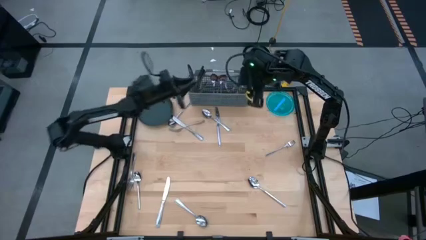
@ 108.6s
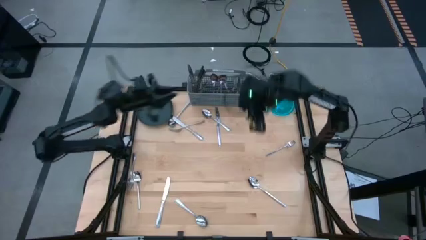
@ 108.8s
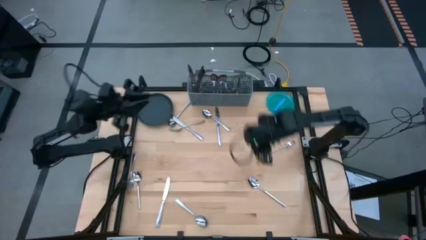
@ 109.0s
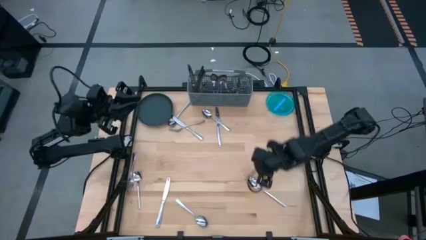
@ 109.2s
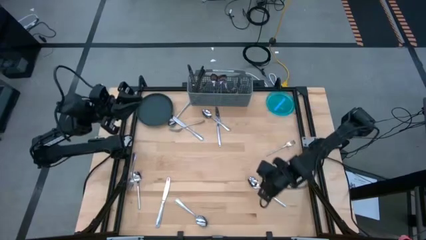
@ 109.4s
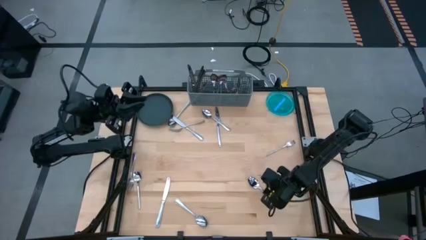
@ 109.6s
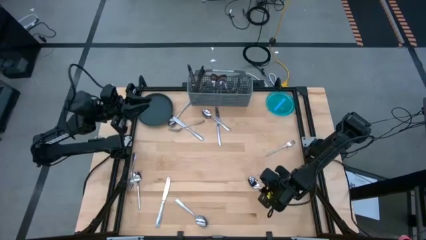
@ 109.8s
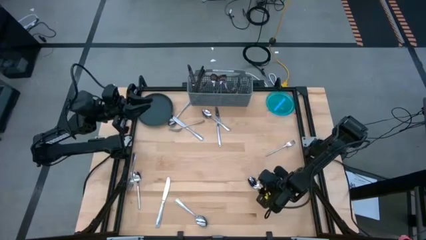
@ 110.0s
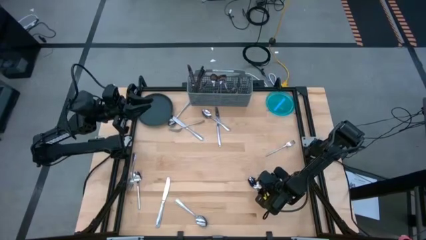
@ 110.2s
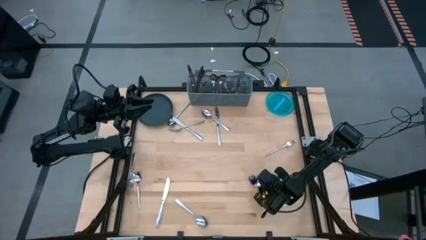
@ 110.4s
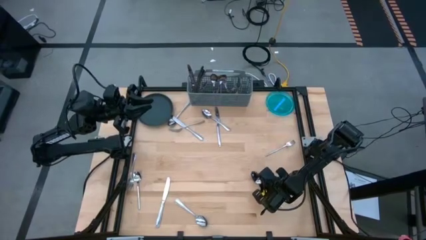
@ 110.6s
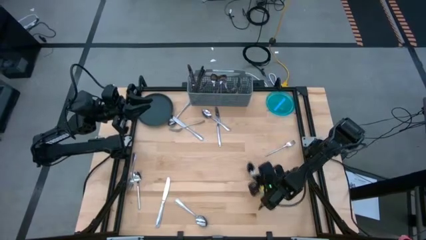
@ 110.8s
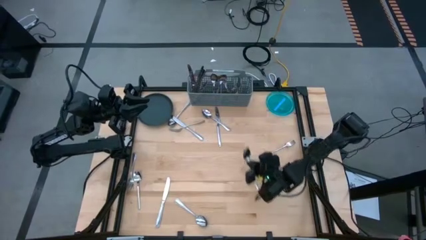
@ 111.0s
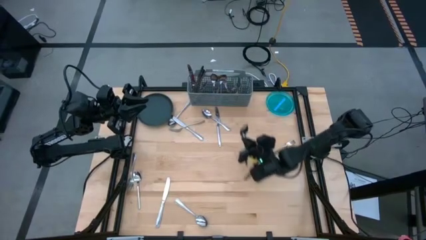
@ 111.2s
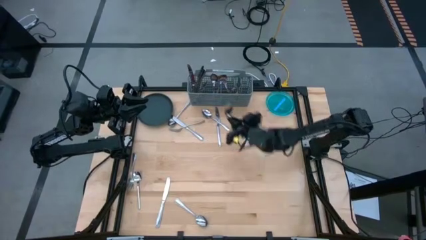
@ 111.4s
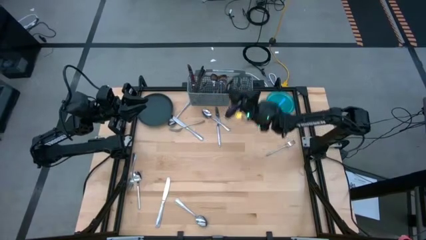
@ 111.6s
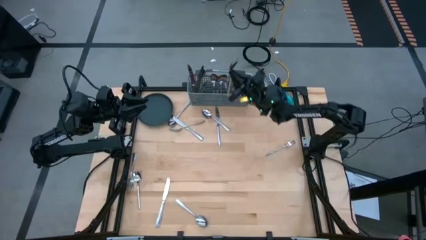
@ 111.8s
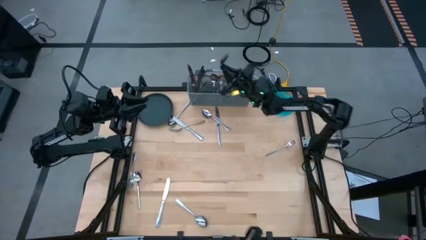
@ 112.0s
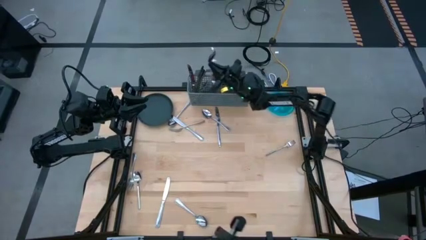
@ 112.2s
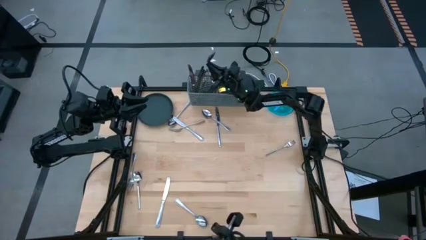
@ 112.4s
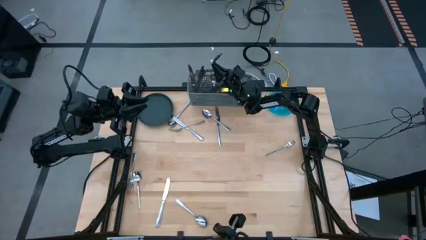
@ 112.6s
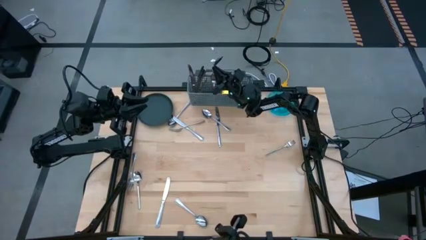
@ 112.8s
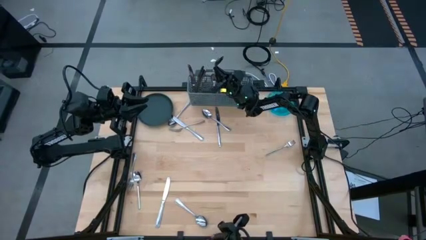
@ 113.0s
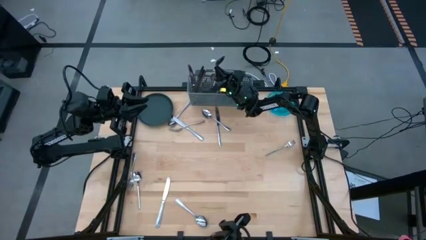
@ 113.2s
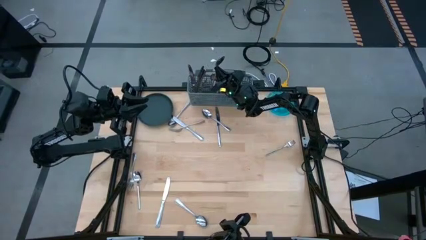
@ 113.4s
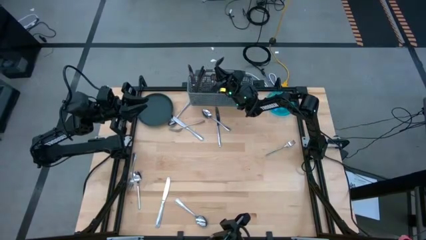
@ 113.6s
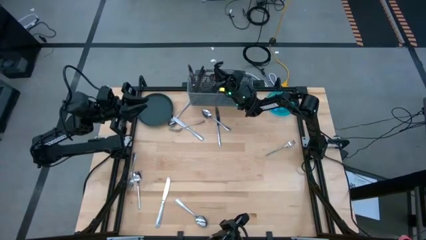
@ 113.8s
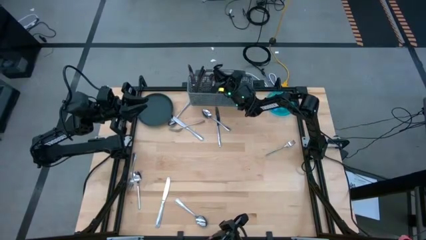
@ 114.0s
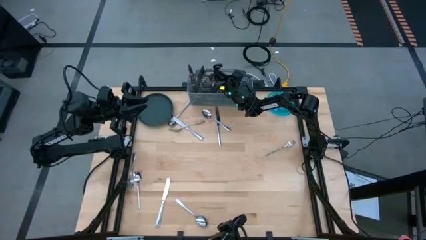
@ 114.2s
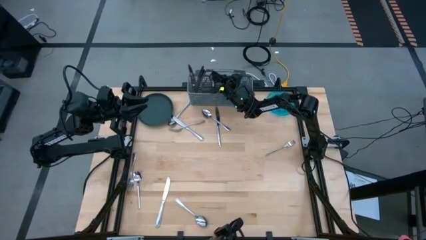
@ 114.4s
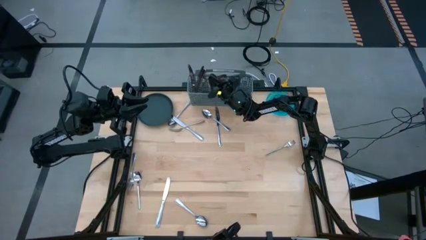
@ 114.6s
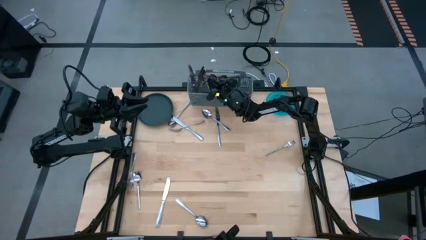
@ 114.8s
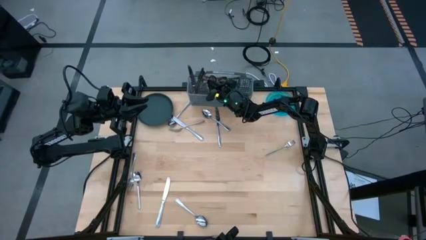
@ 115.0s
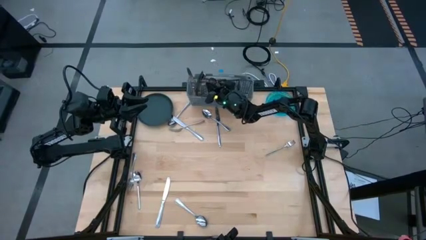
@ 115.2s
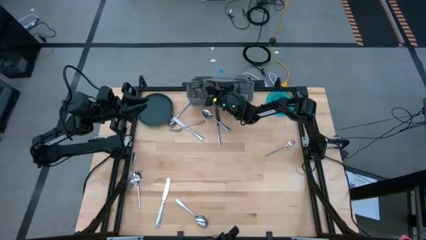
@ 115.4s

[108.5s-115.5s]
Task: Sort silverware
Put the spoon into the silverware basket

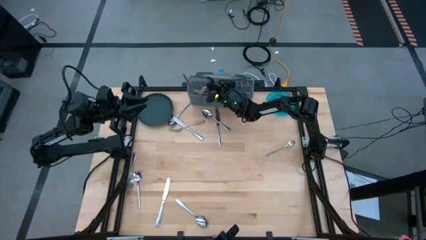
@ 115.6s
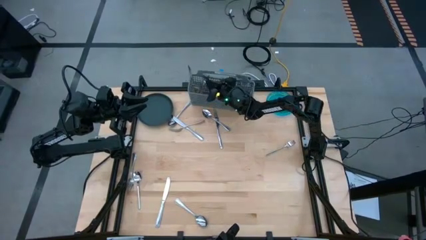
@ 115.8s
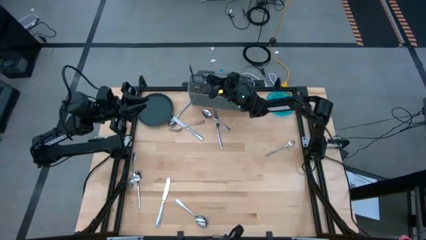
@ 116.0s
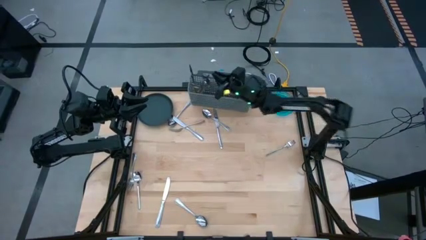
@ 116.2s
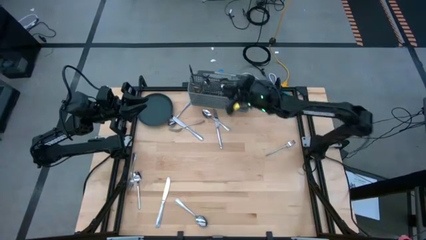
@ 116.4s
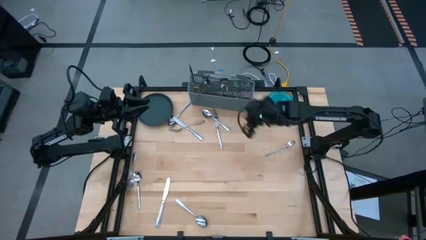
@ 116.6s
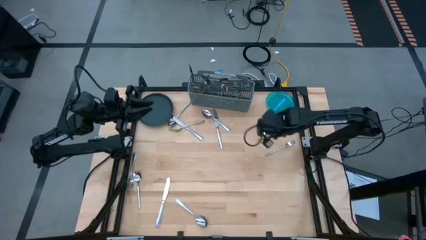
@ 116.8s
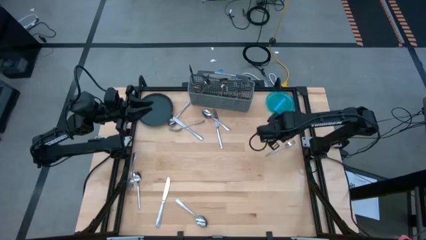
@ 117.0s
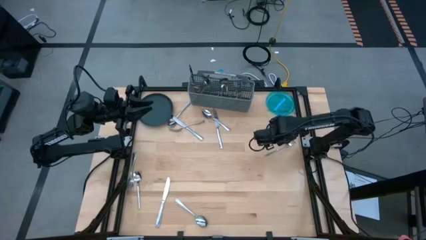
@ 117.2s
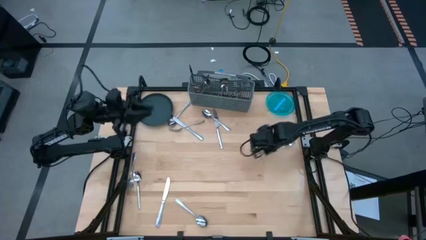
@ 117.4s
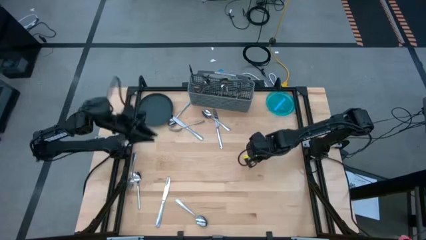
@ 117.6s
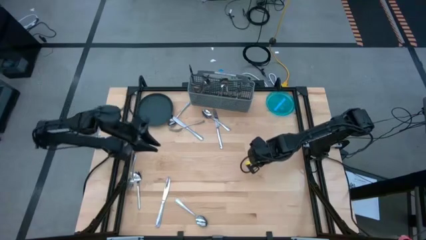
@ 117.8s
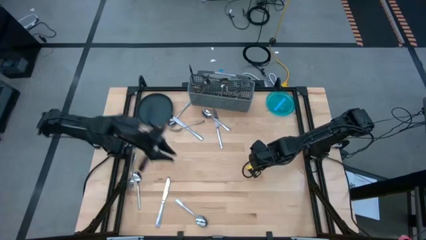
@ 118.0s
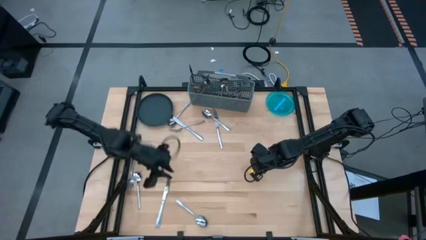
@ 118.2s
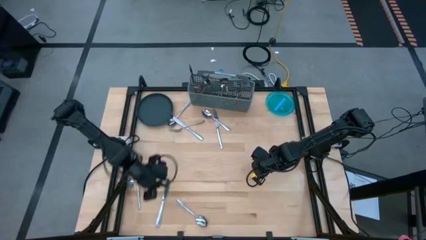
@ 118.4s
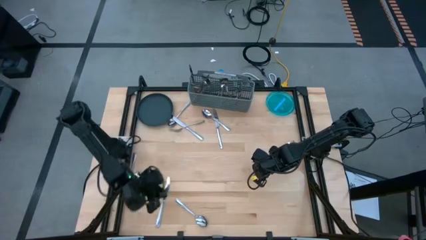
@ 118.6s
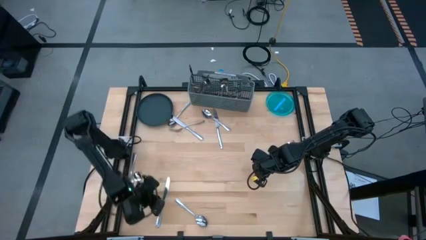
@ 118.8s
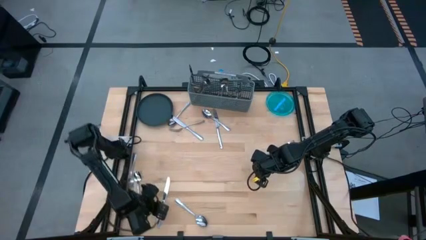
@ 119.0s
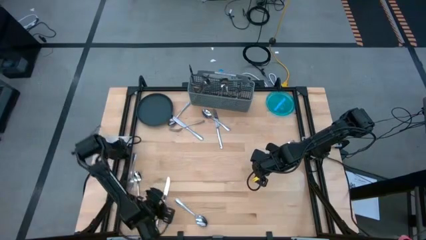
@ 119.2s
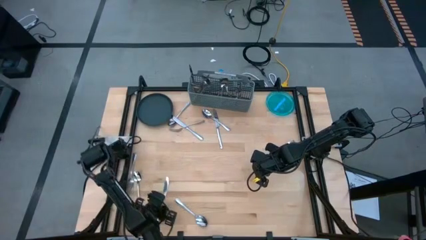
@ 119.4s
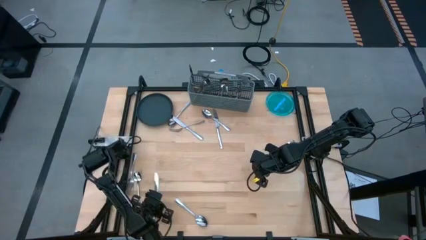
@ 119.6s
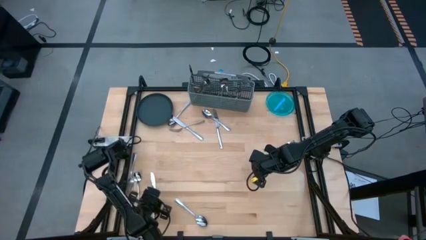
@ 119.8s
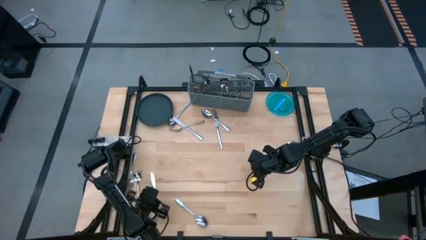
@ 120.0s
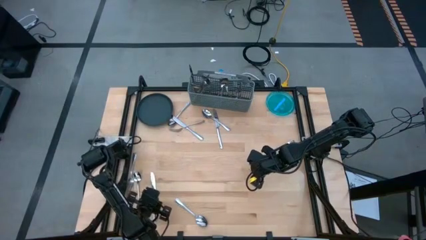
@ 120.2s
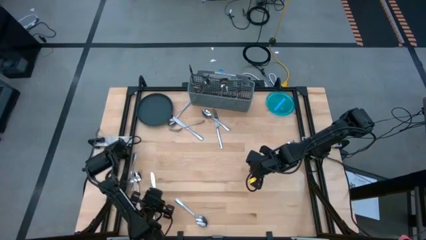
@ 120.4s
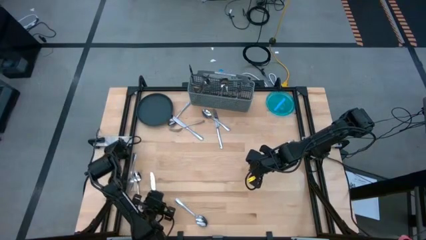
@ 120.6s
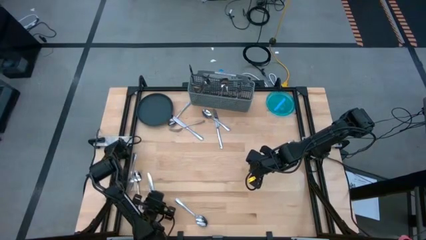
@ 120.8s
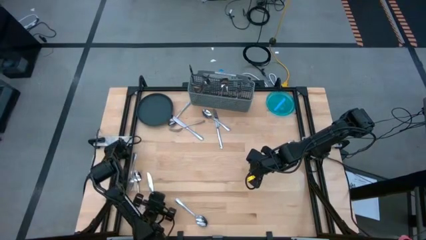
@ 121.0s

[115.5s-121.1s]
Put the knife into the silverware basket
